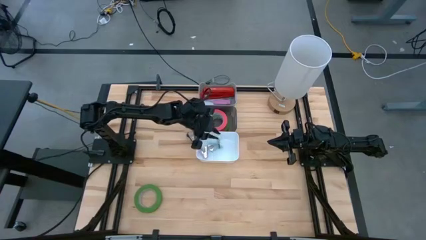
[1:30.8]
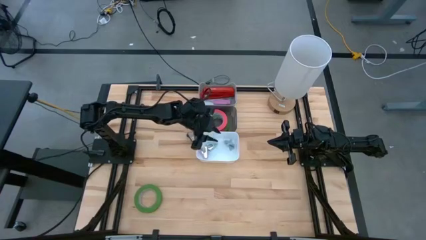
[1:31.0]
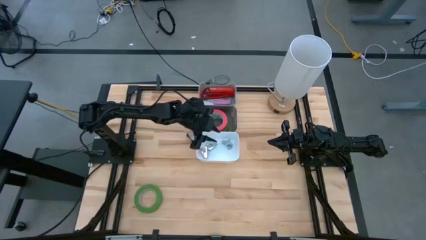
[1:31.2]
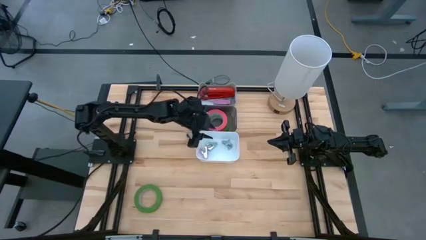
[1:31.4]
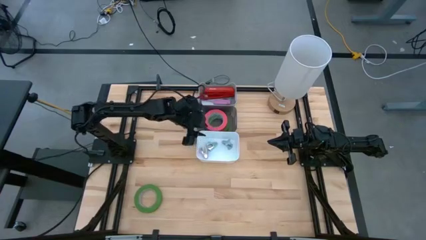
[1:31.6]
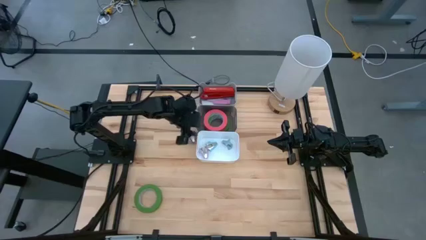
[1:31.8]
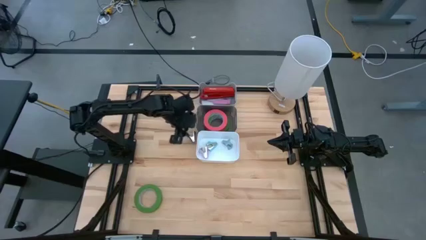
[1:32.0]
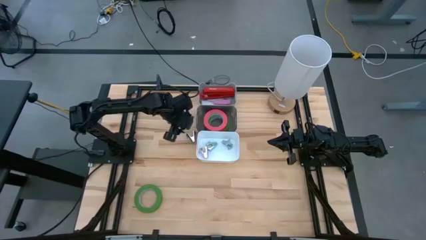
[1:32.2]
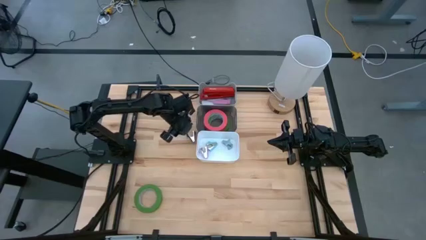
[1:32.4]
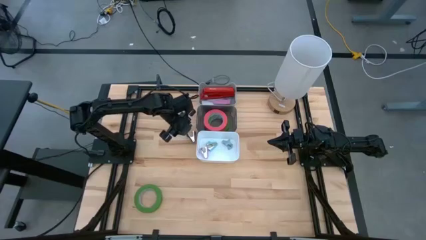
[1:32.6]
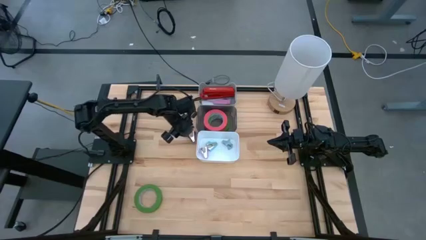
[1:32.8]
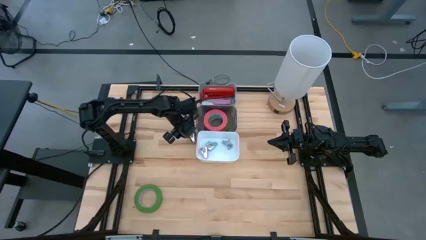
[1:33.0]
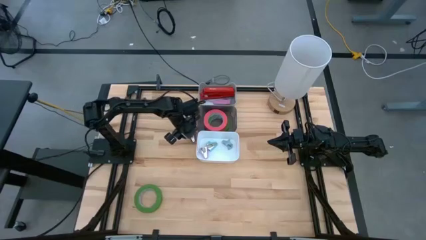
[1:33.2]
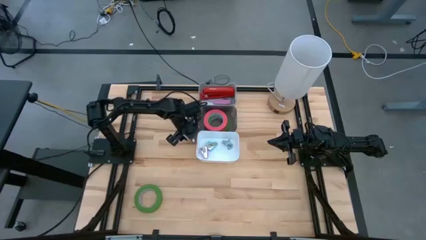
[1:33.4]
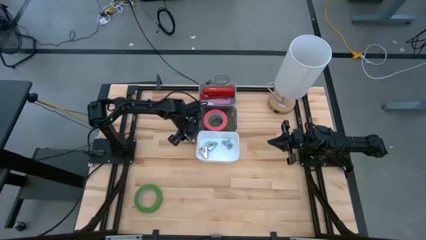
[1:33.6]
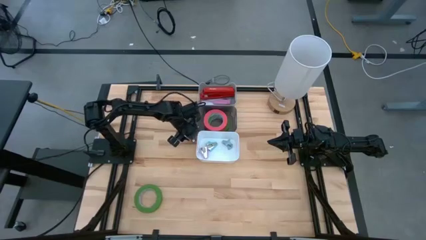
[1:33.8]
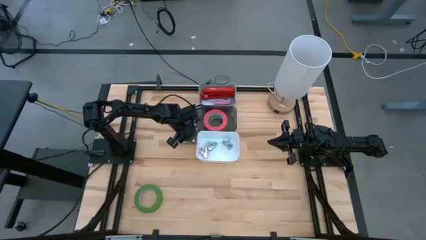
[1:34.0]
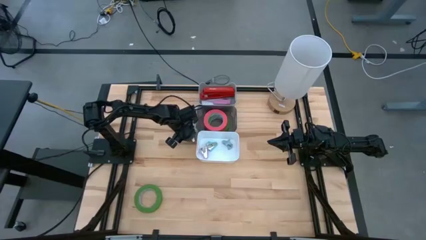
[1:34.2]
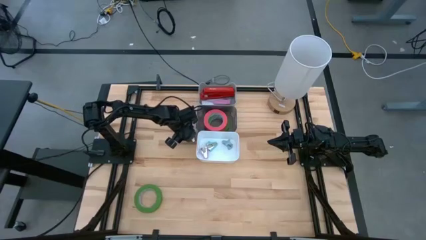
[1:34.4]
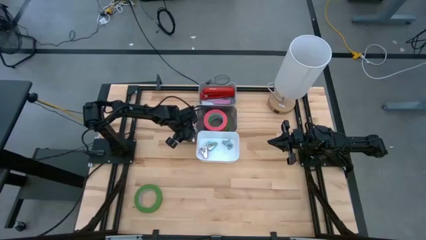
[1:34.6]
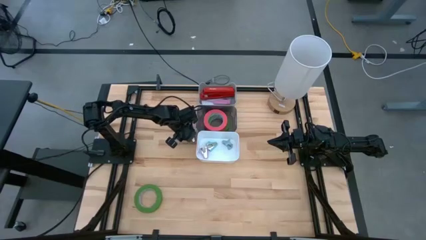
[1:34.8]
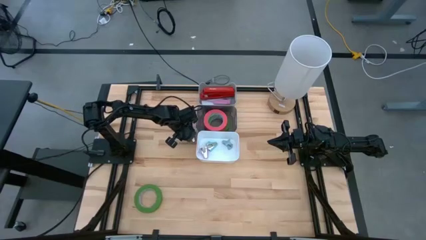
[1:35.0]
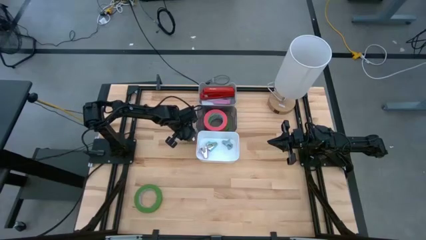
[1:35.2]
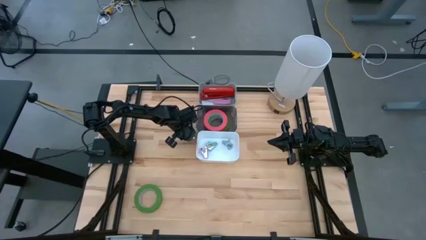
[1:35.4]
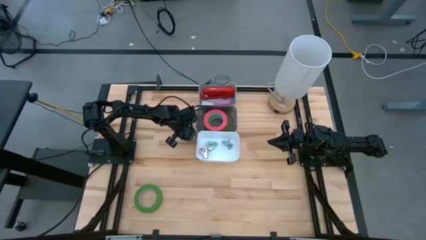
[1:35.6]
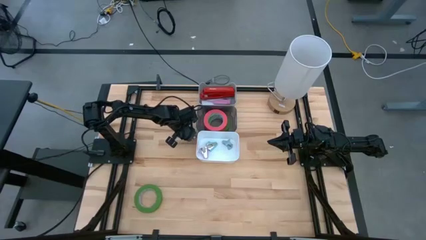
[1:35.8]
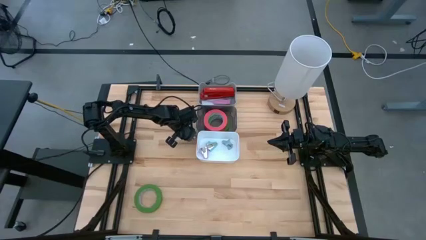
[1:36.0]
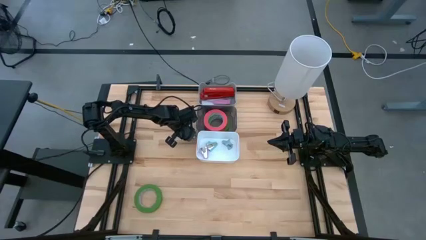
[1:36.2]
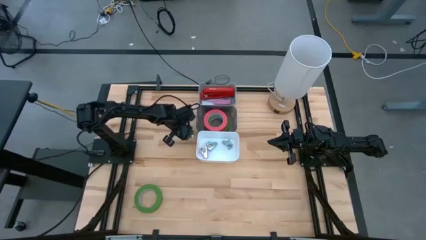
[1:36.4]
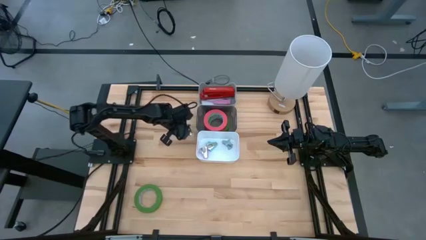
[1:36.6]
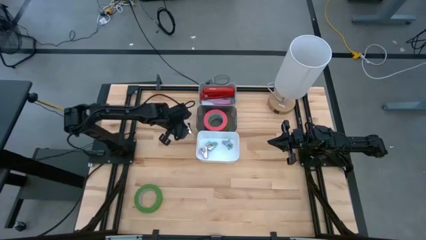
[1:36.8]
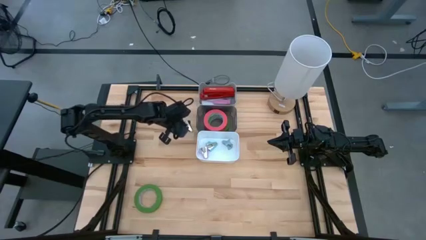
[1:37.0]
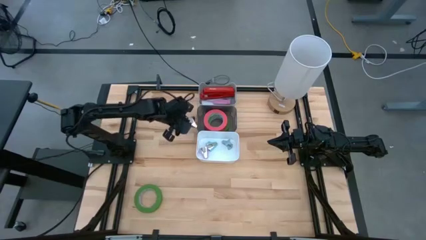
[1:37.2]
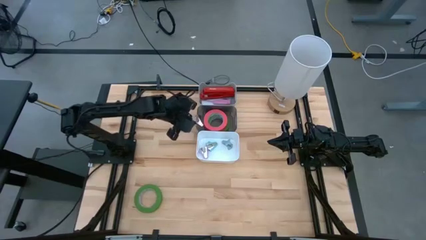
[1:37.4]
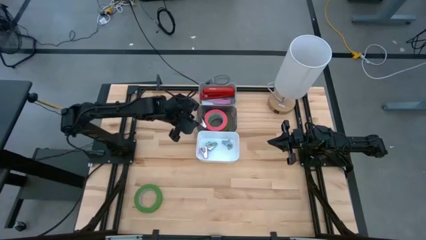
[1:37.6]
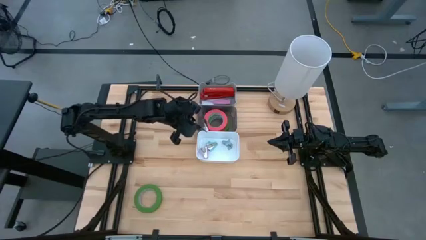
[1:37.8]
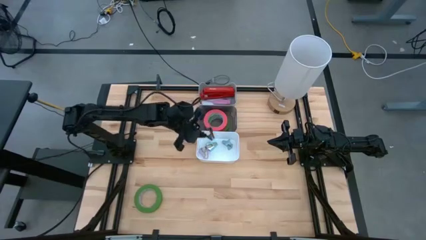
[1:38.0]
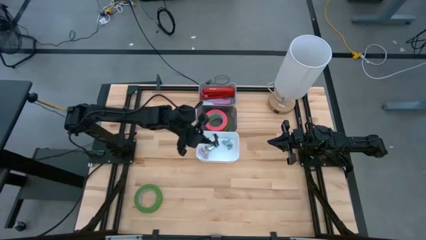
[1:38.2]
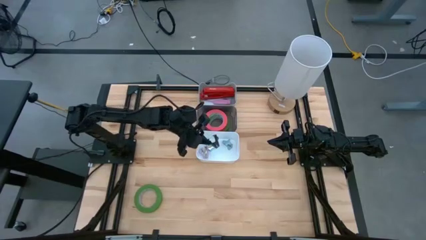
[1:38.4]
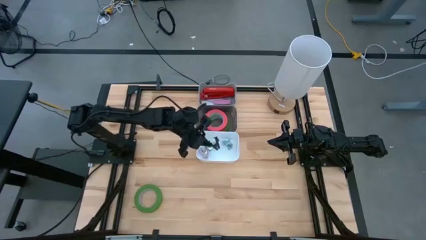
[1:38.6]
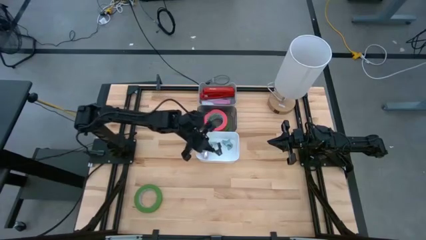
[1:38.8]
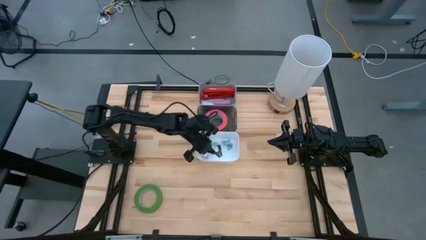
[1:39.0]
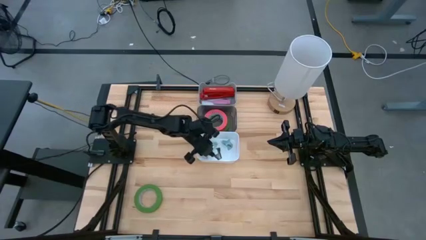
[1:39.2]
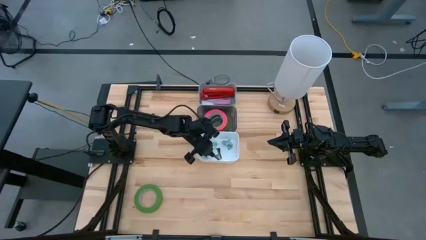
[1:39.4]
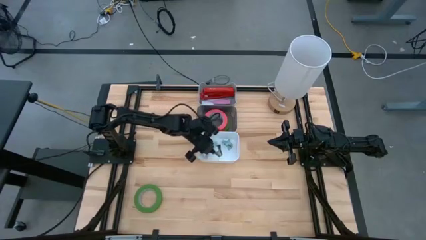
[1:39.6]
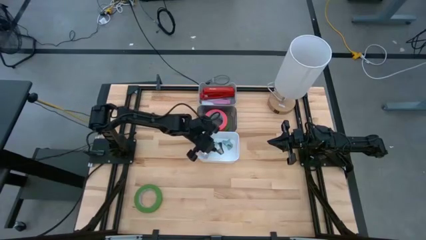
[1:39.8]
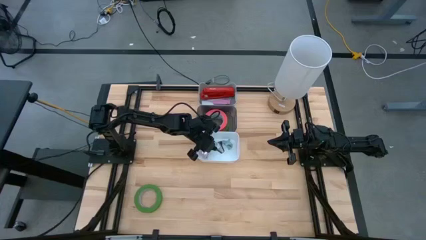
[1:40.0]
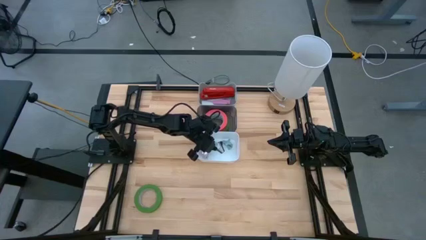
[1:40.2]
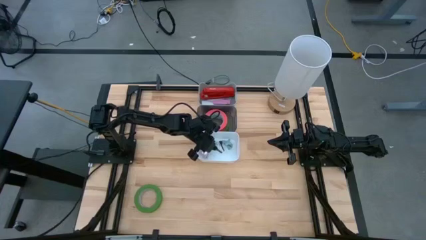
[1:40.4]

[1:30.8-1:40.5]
Task: Pick and place Stapler, Stapler remover, tape
Put the black staple remover in the white bin
